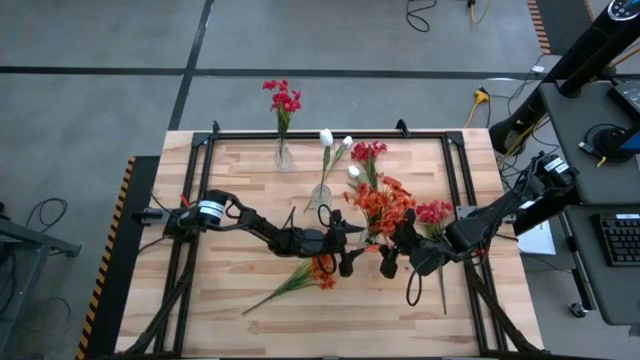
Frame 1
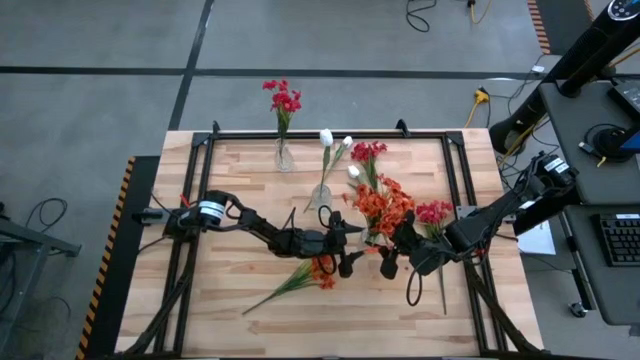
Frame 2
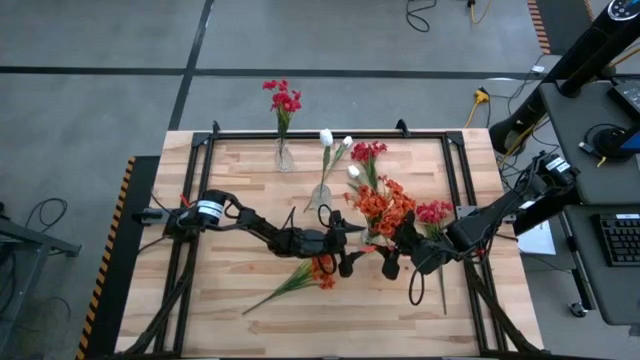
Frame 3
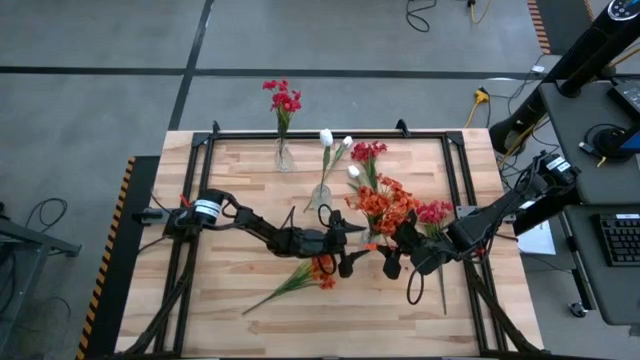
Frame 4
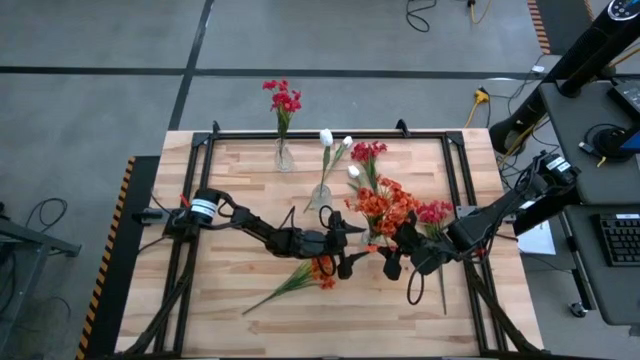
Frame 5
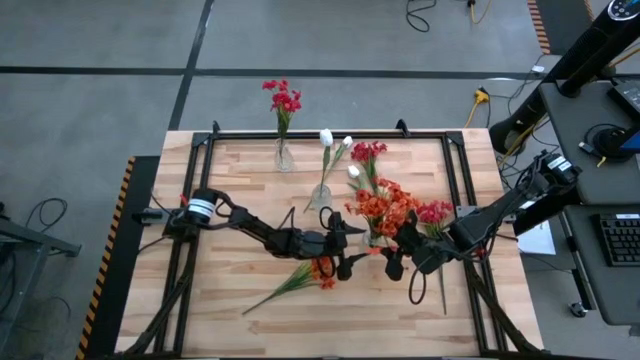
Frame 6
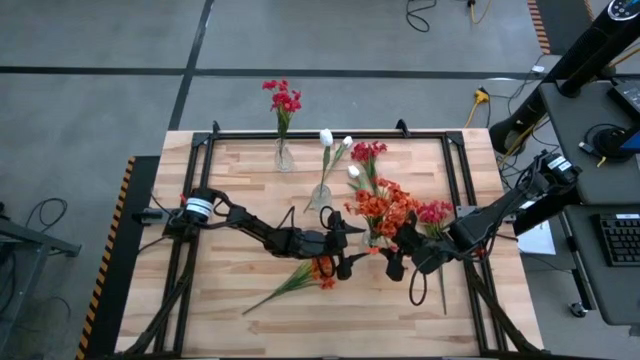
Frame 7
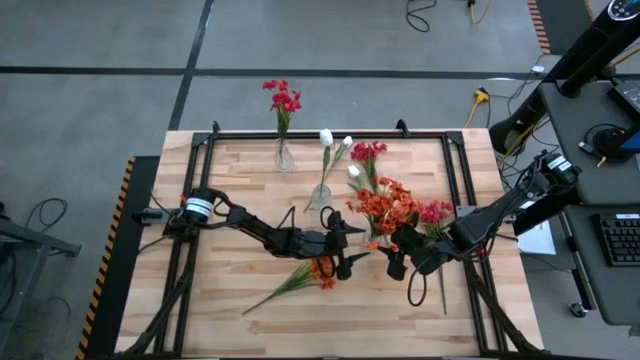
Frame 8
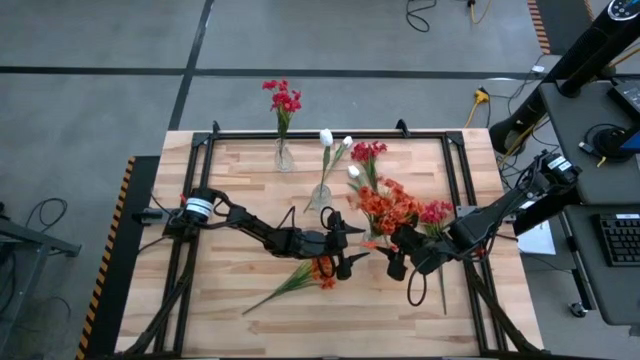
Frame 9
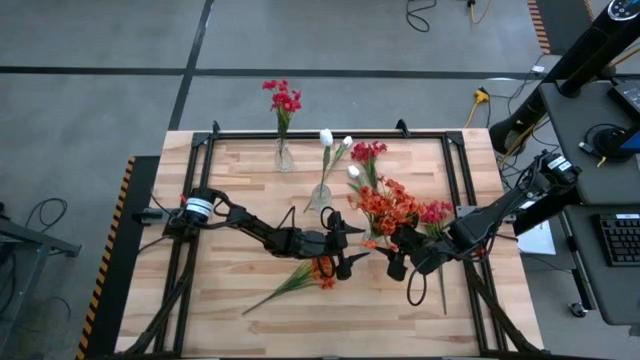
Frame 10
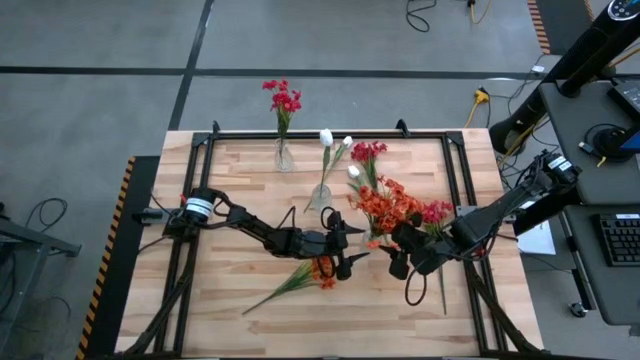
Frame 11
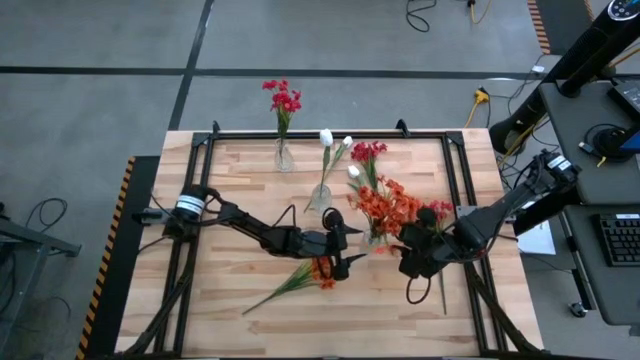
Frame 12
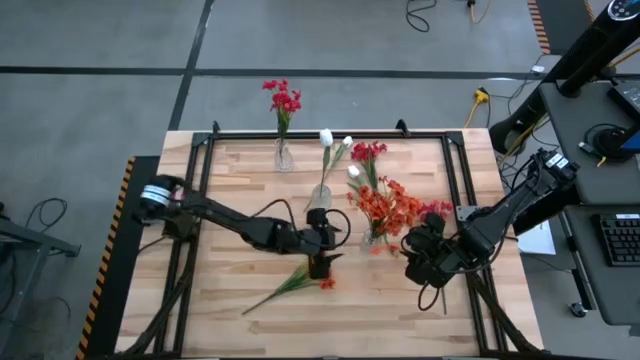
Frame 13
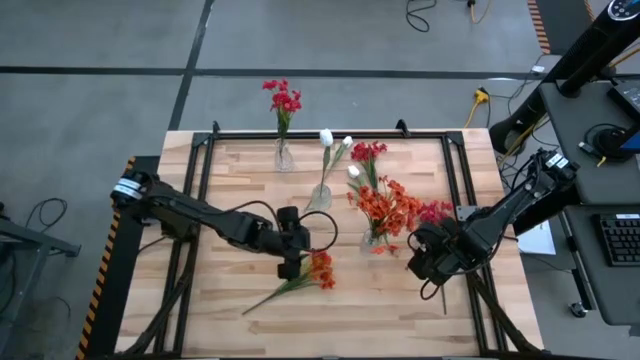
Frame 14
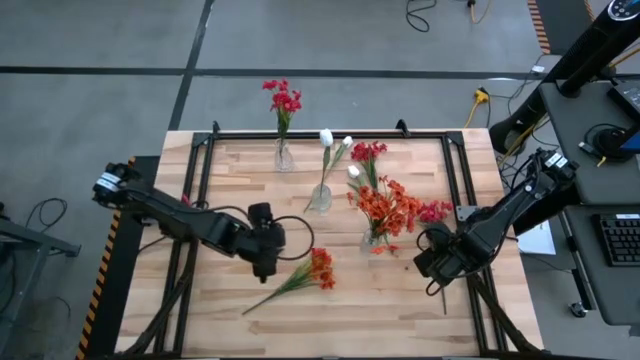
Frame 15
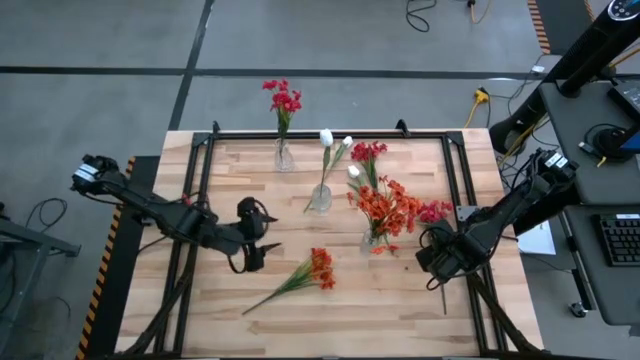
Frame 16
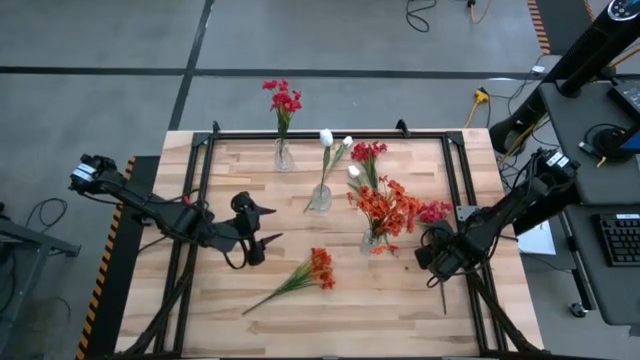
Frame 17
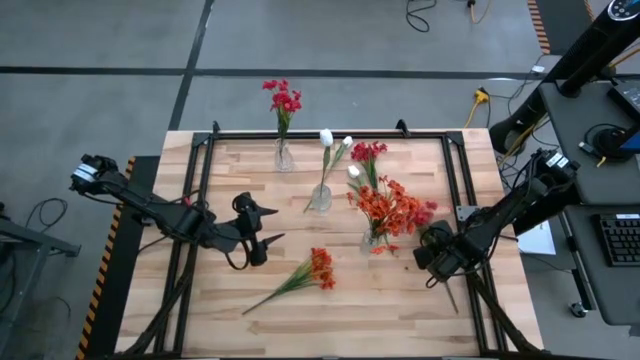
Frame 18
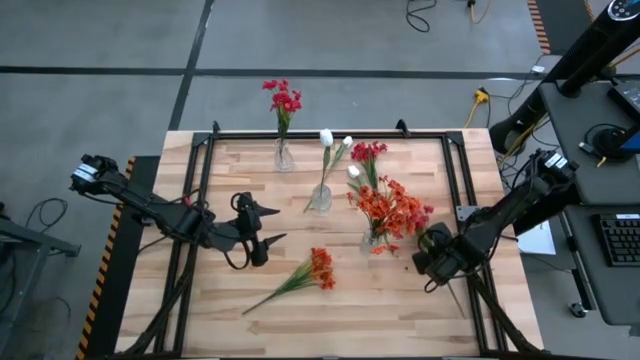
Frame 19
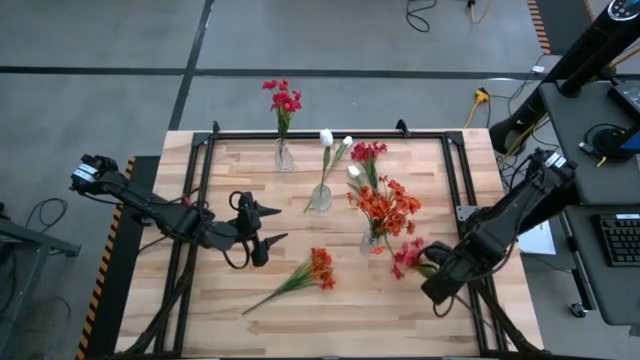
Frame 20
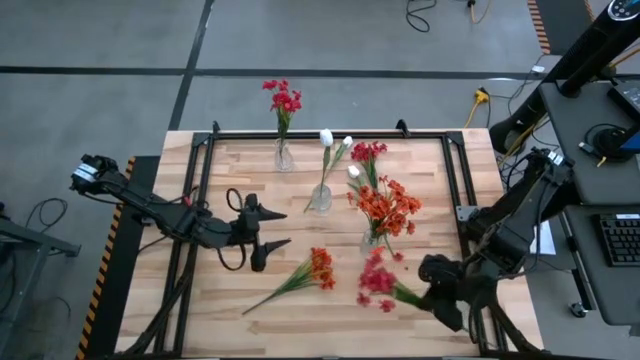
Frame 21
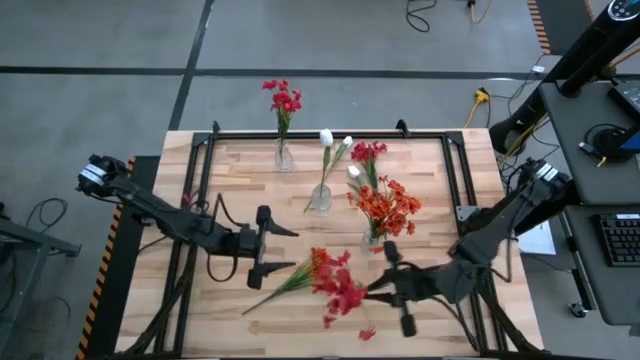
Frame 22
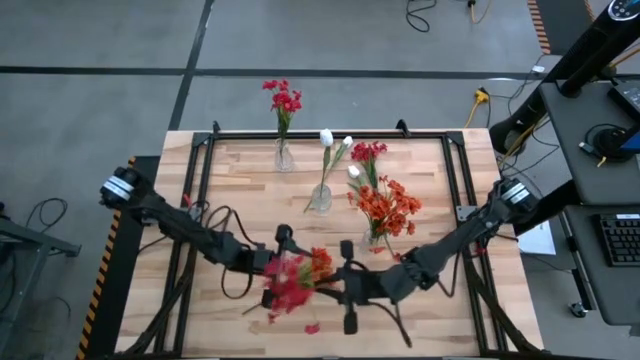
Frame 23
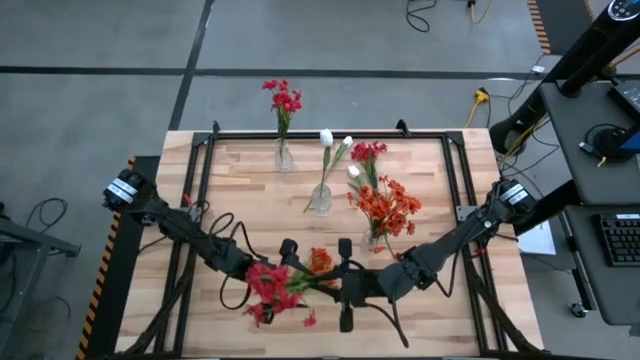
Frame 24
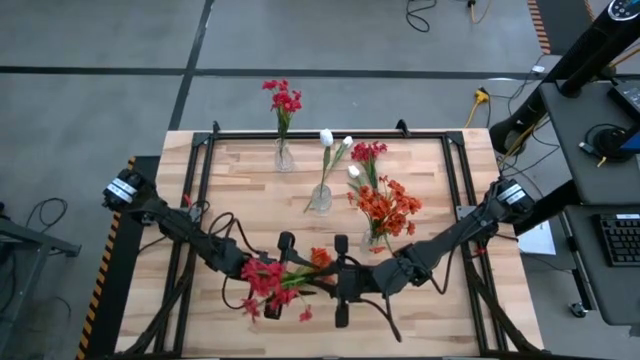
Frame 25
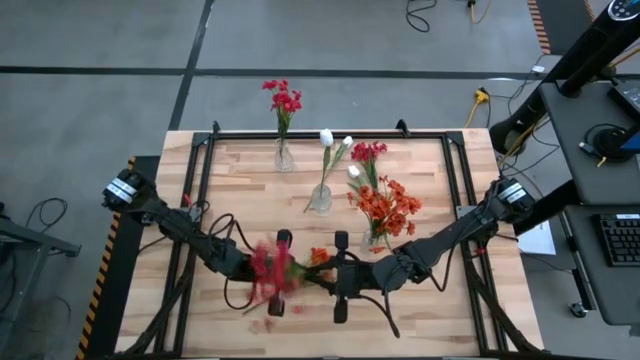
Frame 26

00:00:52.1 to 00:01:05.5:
Task: Sort flowers into vase by color
Put the middle right red sprig flower into the top left transparent glass vase

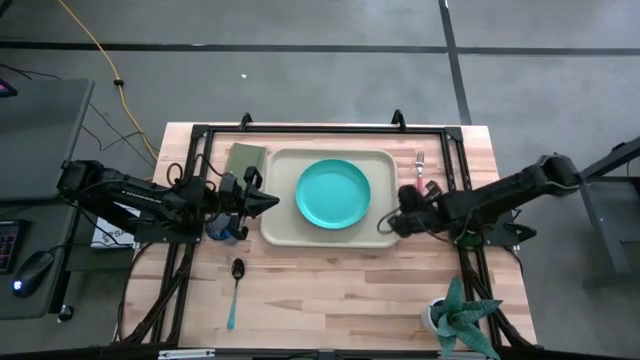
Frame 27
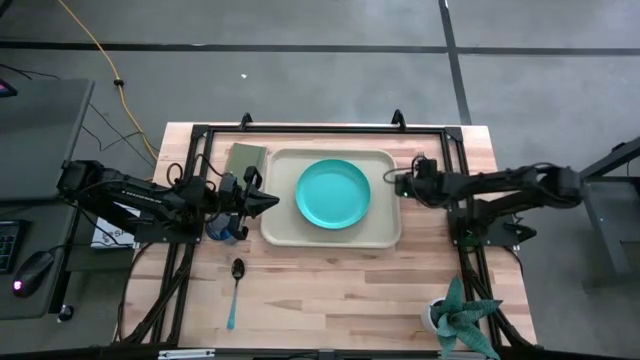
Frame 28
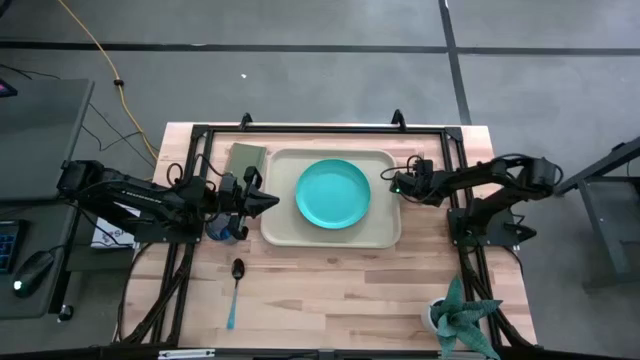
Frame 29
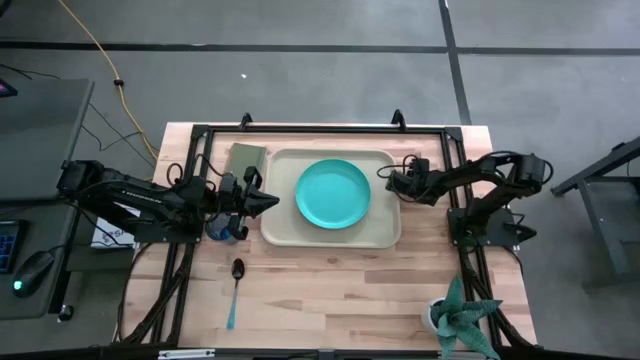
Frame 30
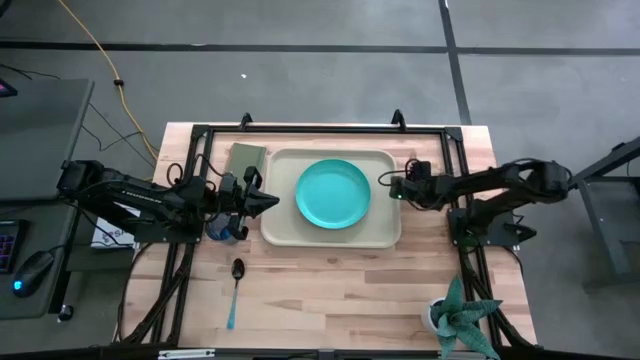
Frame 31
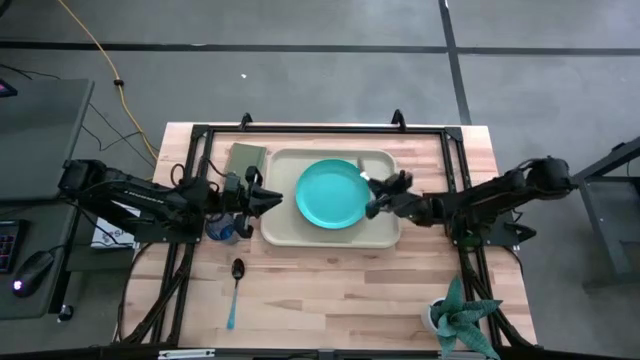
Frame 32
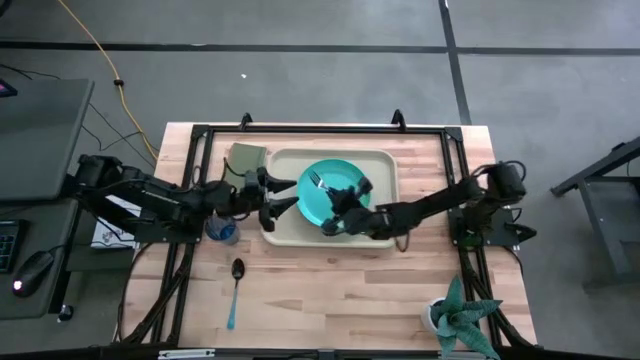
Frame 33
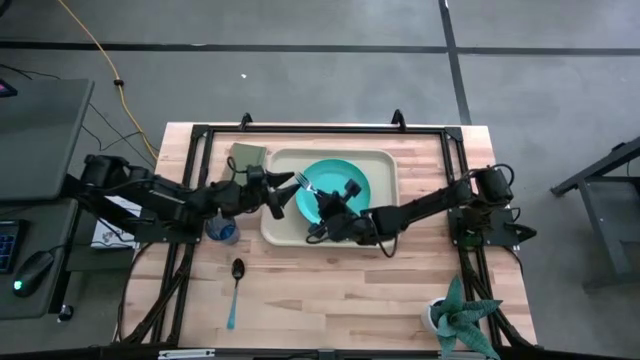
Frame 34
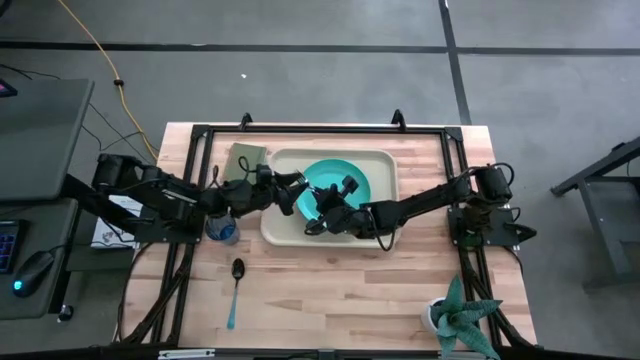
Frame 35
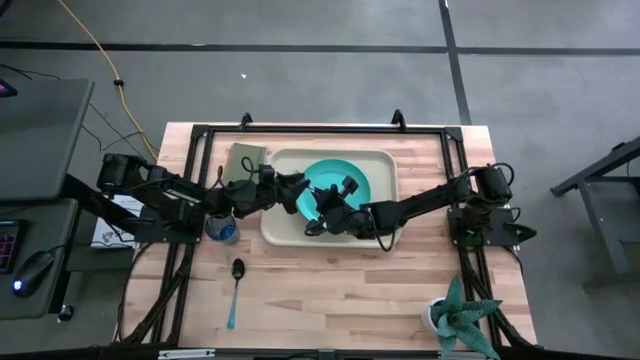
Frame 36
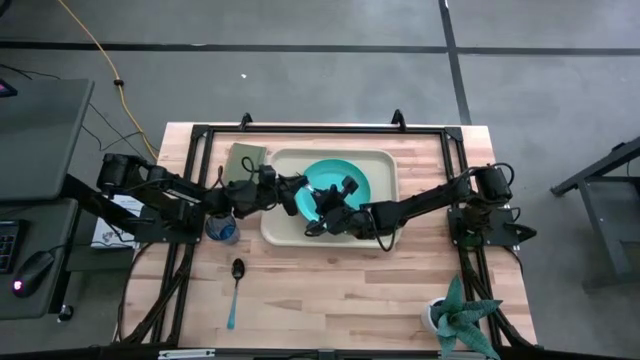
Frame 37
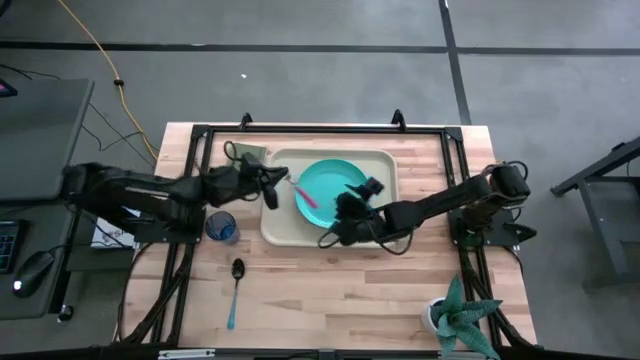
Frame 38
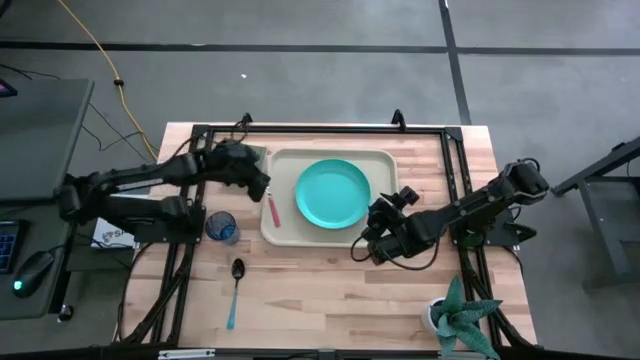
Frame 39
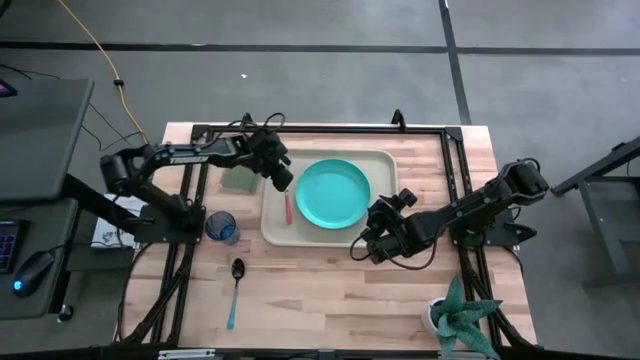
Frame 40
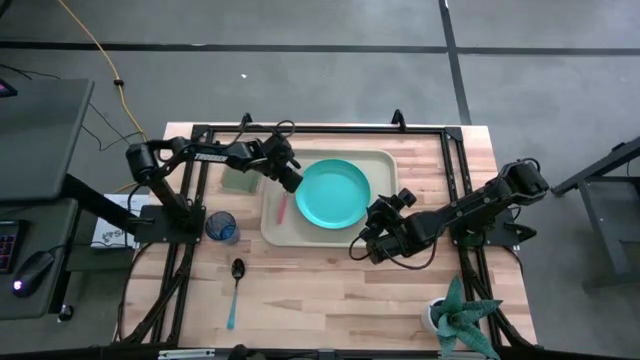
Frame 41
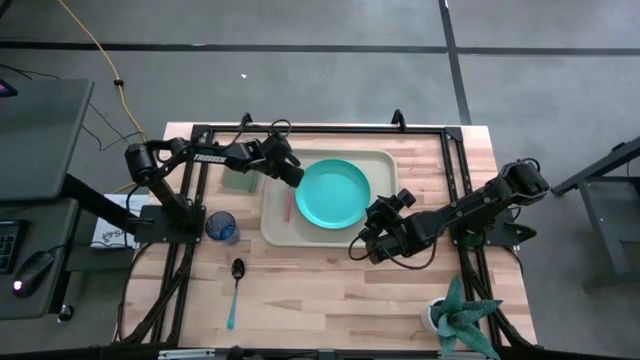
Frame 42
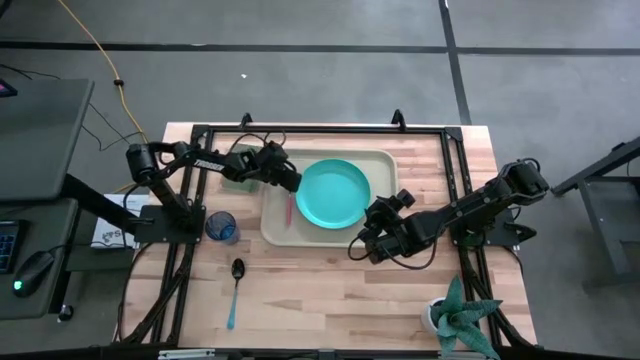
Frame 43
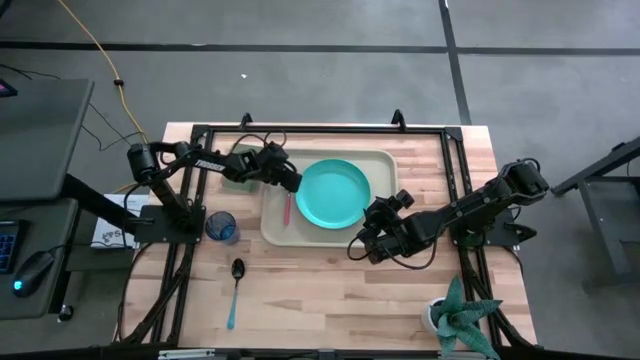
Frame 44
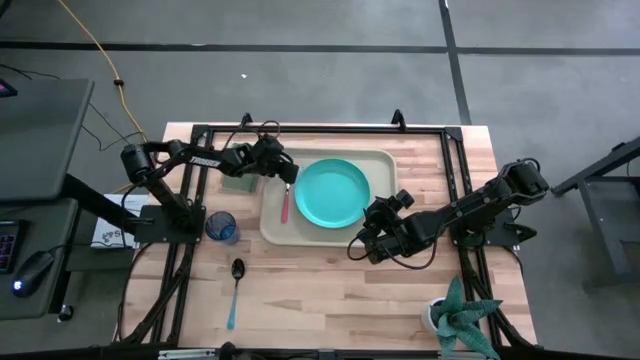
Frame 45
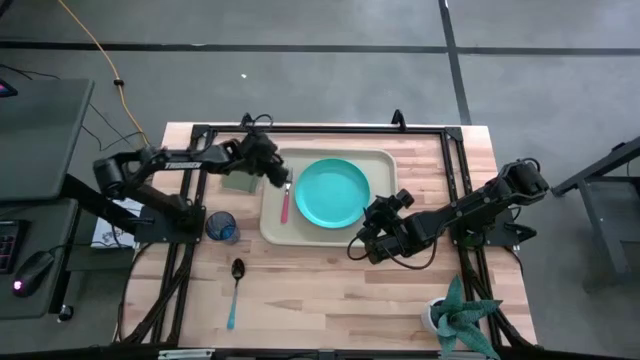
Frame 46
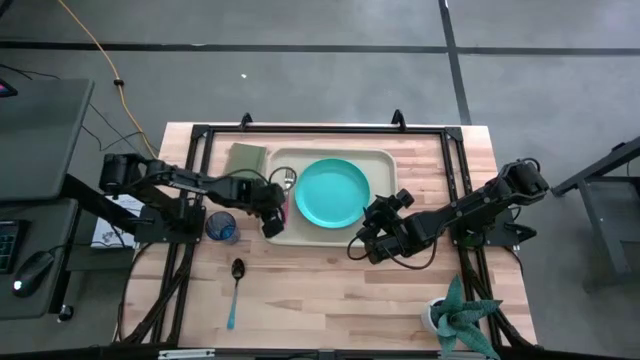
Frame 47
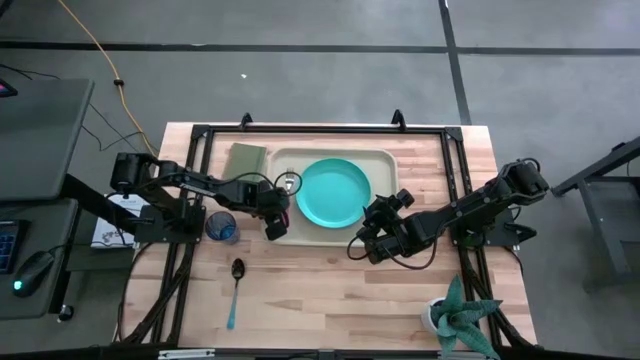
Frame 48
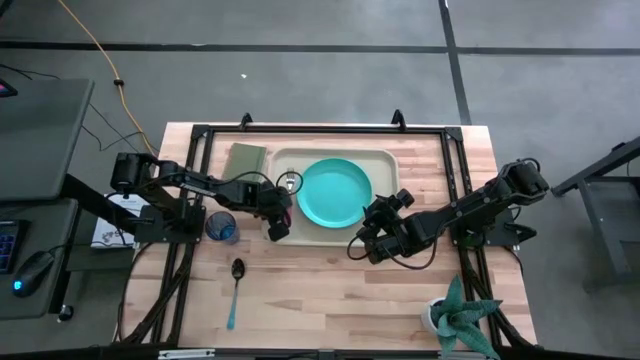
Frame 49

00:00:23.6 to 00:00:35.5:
Task: Pick and place plate/cup/fork/spoon on tray
Put the pink fork on the left side of the green plate
